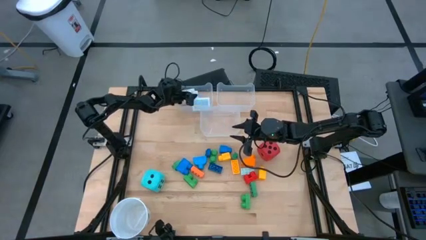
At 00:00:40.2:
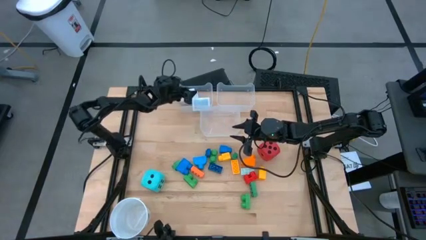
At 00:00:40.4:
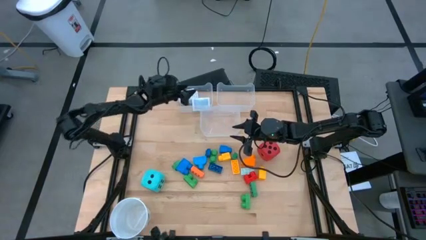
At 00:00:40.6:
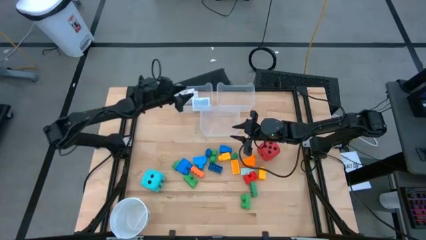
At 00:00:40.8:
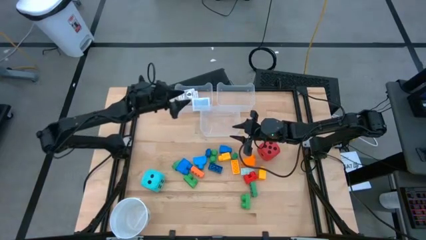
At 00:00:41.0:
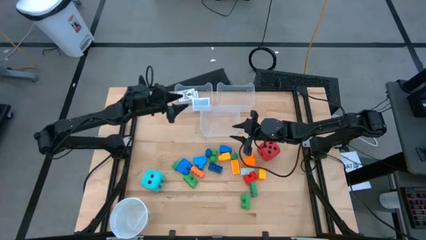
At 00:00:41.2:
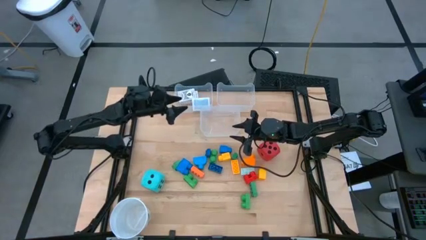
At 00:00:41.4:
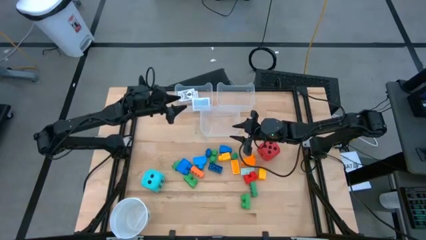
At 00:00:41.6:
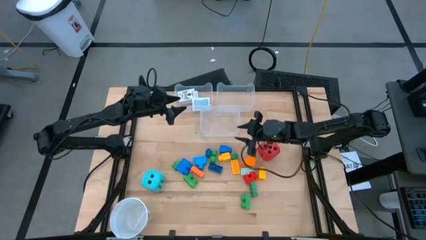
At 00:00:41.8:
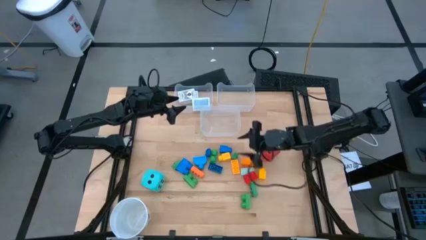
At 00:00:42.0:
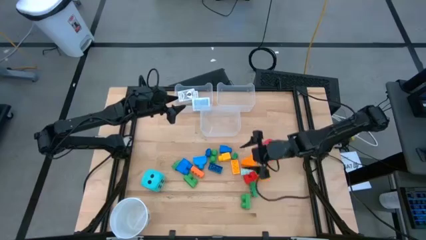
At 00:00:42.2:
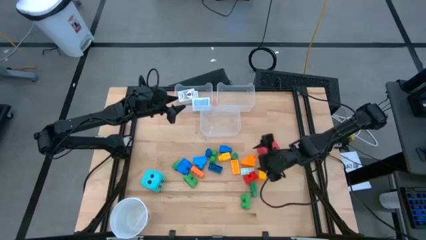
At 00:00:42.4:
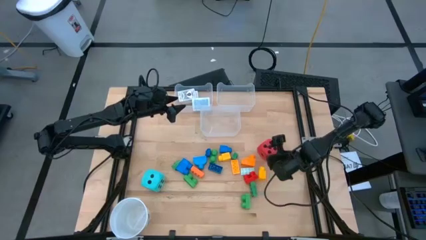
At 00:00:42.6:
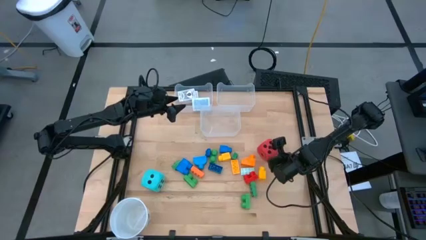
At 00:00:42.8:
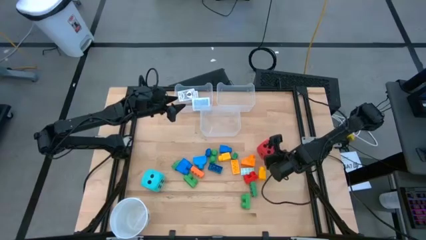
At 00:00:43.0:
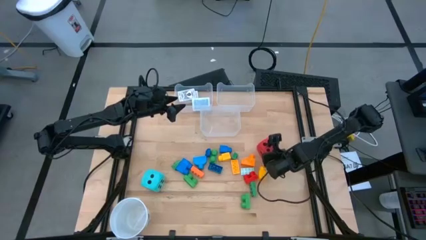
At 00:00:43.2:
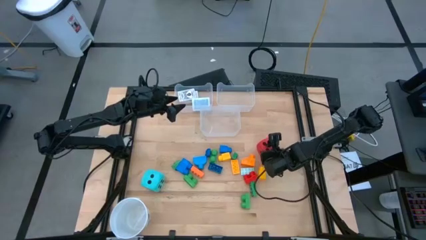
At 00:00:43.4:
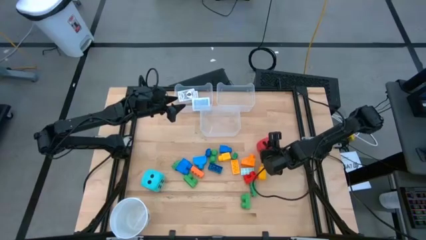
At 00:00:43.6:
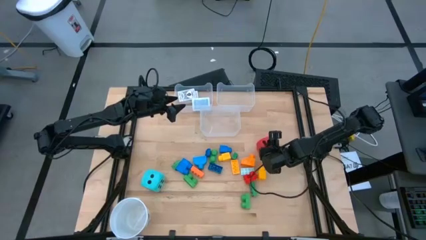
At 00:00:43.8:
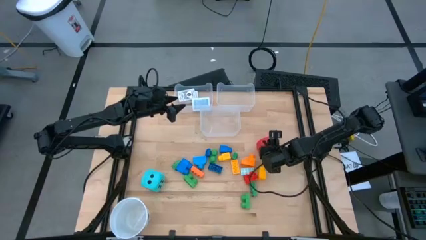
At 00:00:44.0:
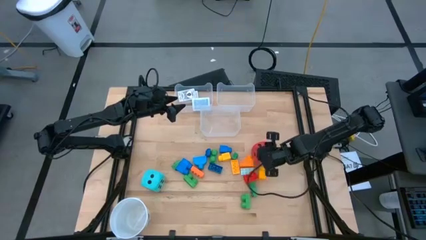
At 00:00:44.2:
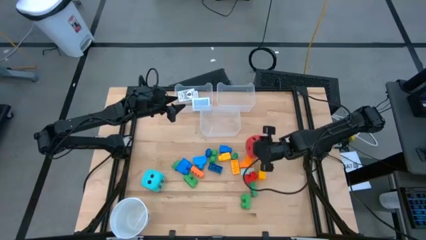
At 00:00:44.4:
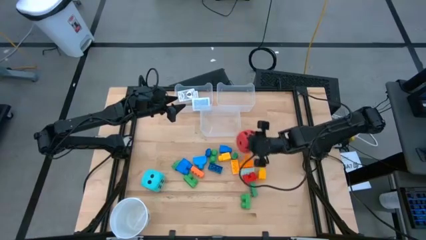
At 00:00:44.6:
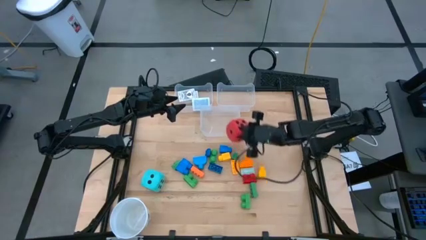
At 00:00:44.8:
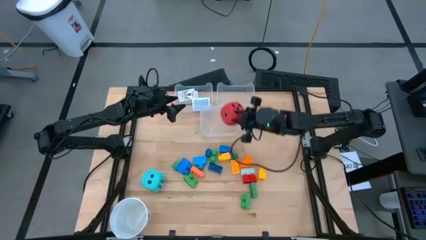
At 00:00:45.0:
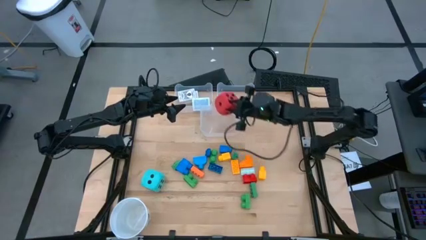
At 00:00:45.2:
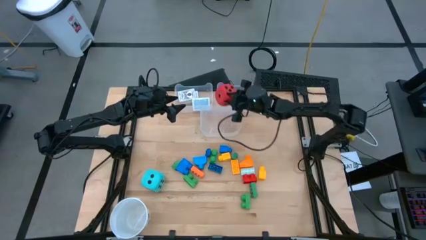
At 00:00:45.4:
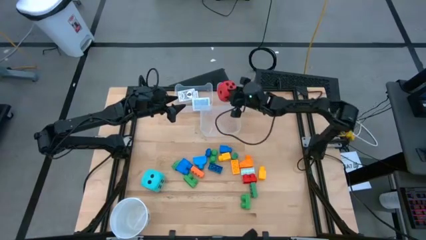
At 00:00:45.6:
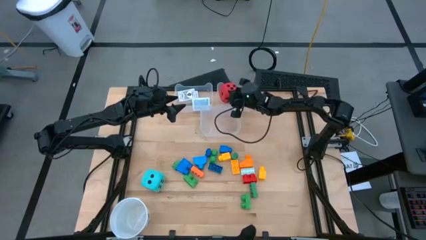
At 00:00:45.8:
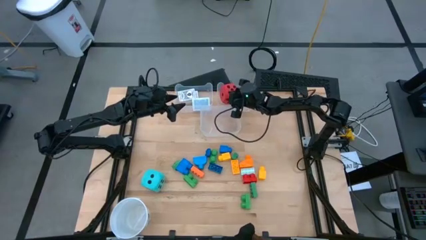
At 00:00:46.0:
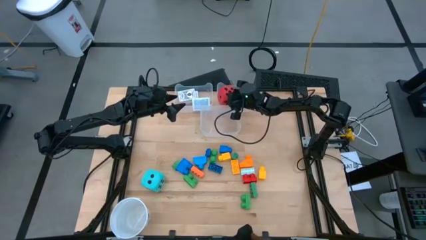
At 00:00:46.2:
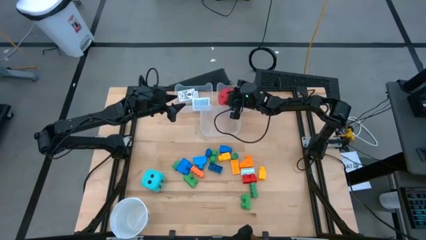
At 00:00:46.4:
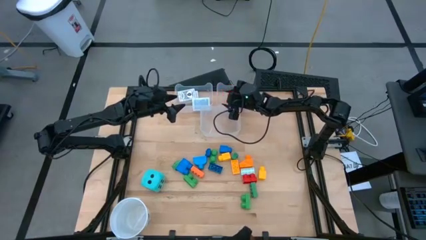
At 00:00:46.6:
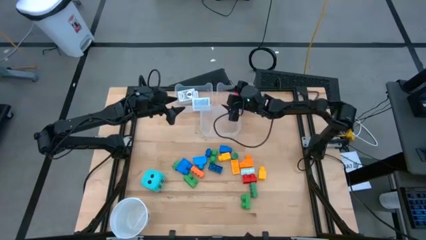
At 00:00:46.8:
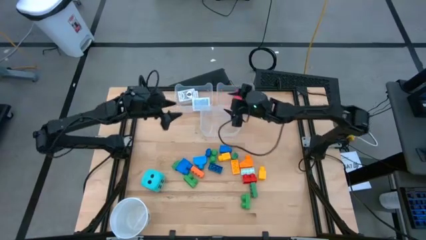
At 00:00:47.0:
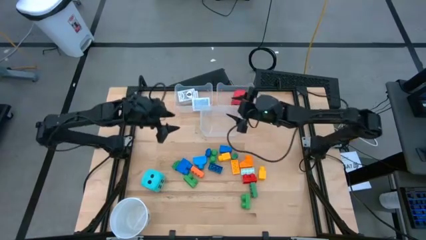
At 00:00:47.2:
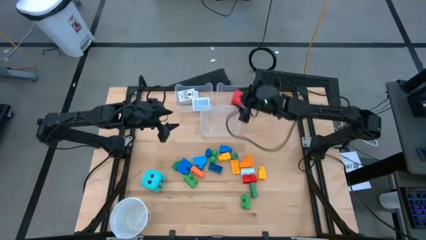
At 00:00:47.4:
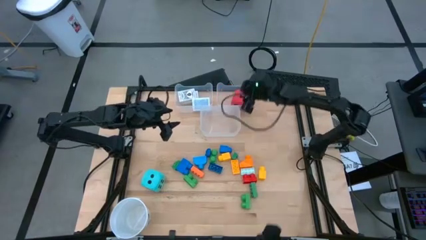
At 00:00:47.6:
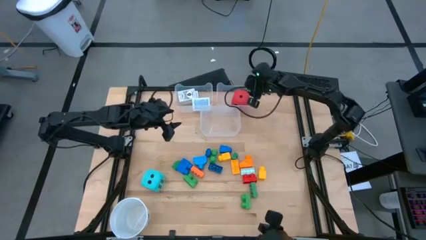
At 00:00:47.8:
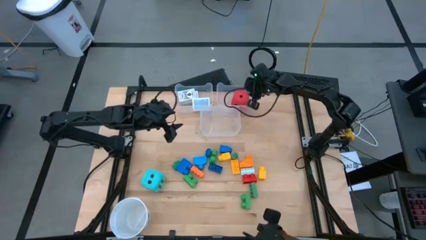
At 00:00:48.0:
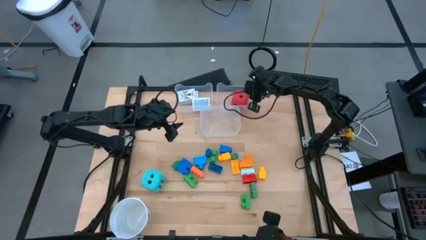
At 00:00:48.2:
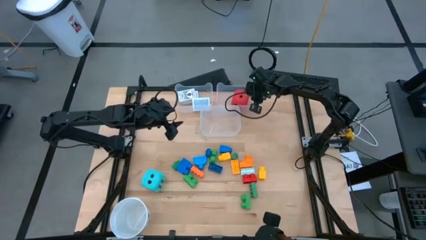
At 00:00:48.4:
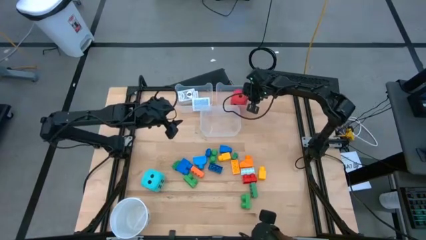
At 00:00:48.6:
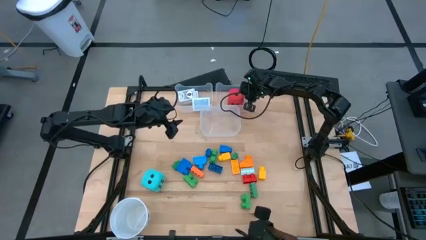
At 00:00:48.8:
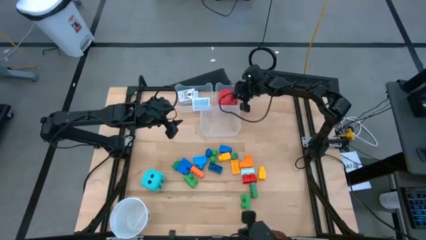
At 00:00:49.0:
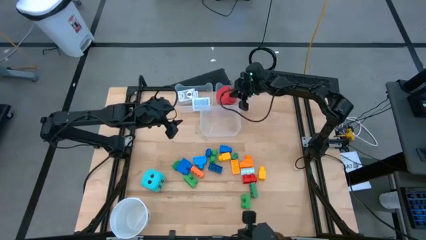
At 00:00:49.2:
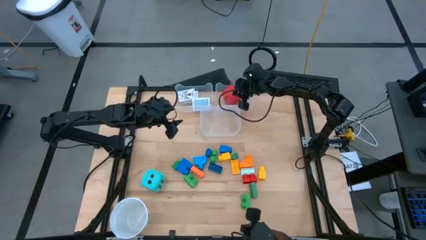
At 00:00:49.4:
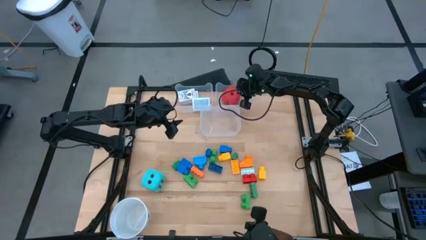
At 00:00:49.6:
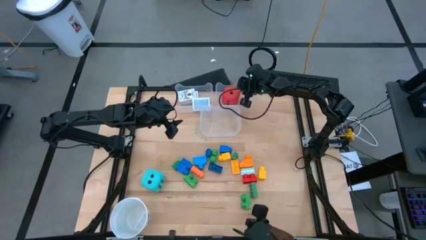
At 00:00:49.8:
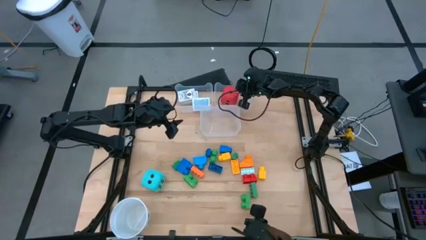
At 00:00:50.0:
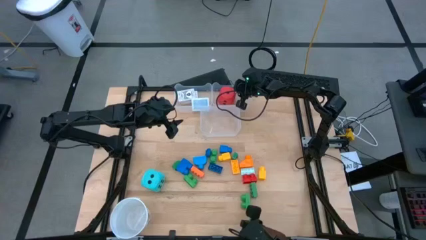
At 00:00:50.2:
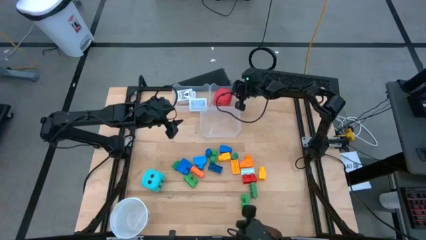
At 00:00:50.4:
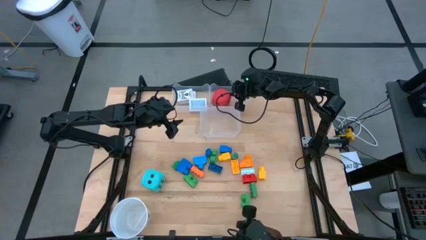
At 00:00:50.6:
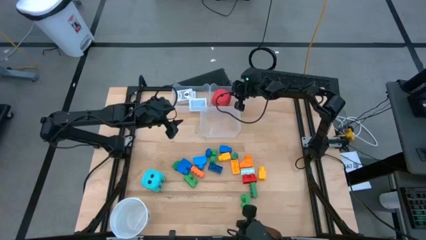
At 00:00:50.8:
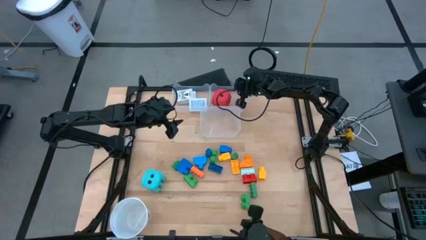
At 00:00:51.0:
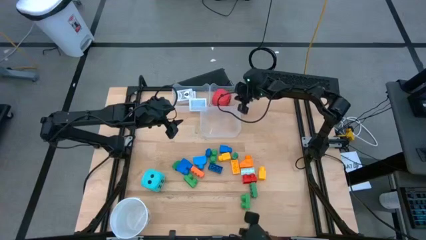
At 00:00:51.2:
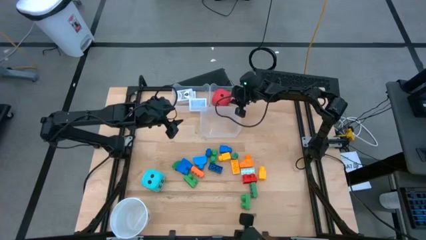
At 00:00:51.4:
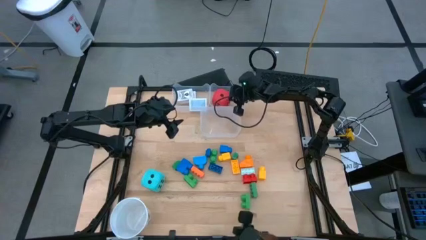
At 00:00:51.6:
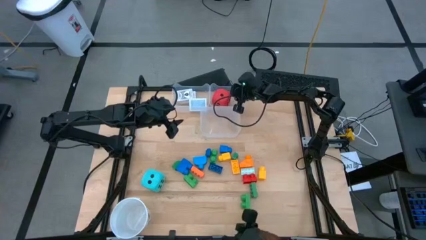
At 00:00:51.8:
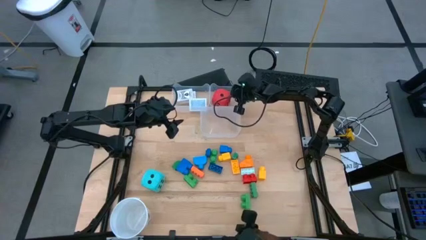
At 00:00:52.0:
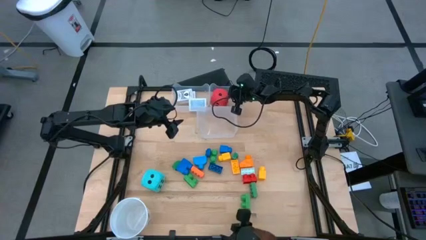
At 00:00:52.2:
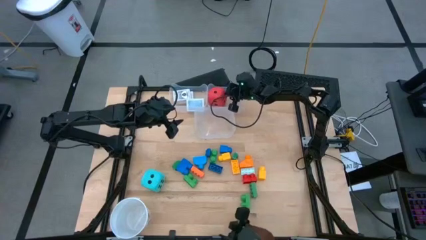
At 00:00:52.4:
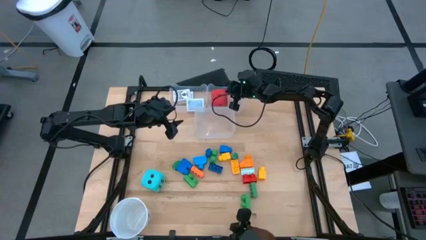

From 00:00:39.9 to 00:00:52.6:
Task: Pick & Place Toys
Put the red dice into the top right transparent bin
